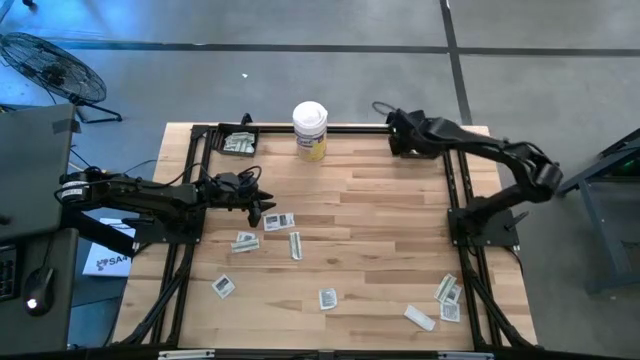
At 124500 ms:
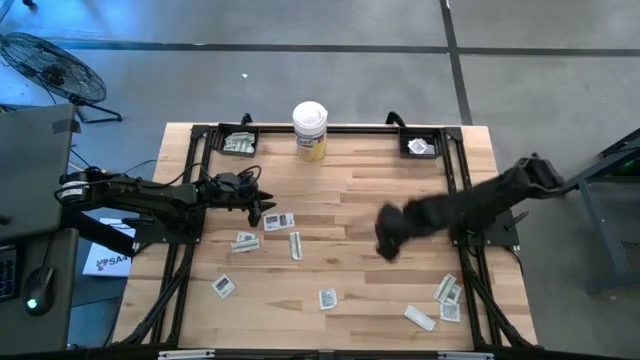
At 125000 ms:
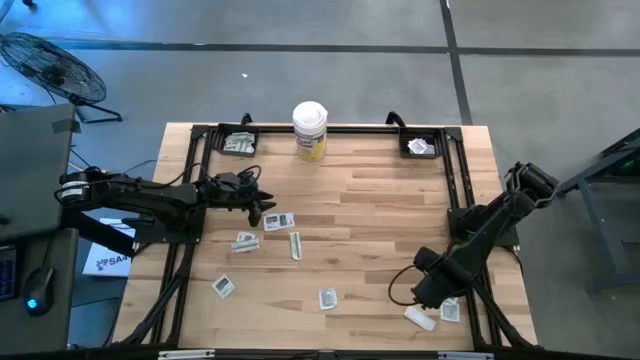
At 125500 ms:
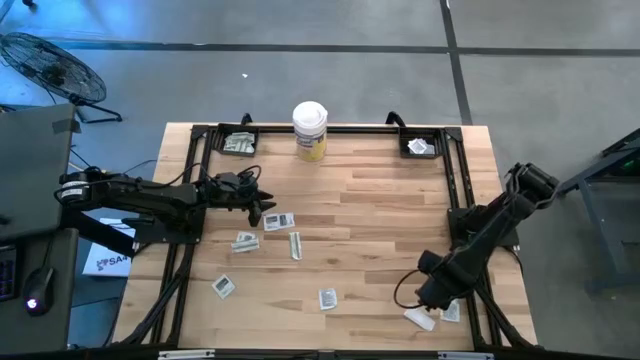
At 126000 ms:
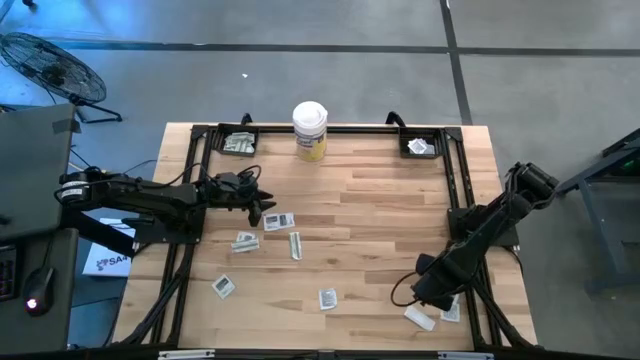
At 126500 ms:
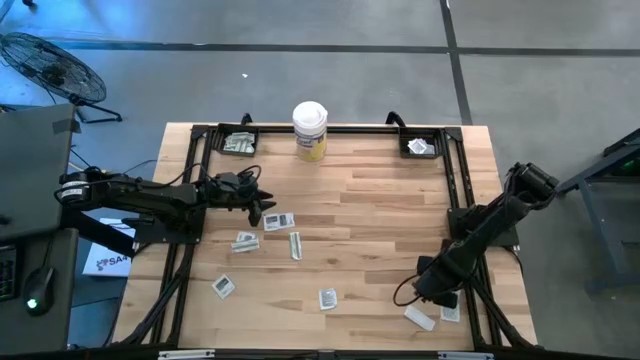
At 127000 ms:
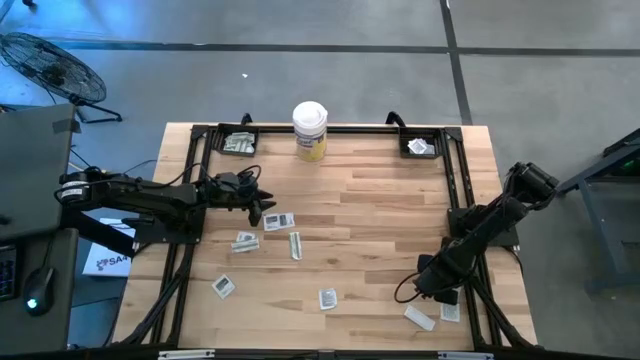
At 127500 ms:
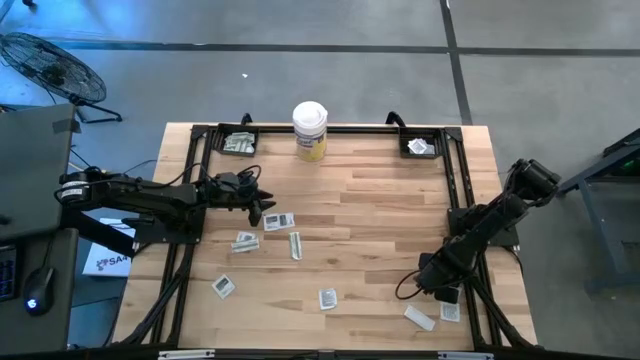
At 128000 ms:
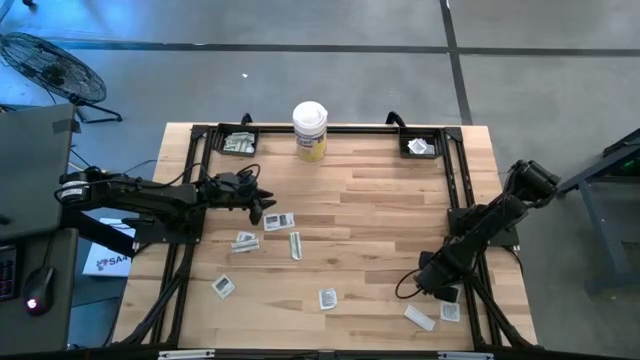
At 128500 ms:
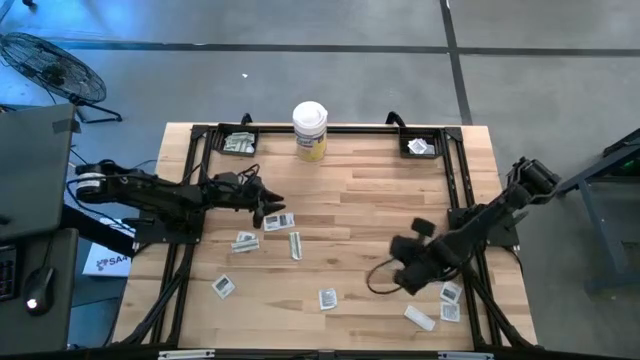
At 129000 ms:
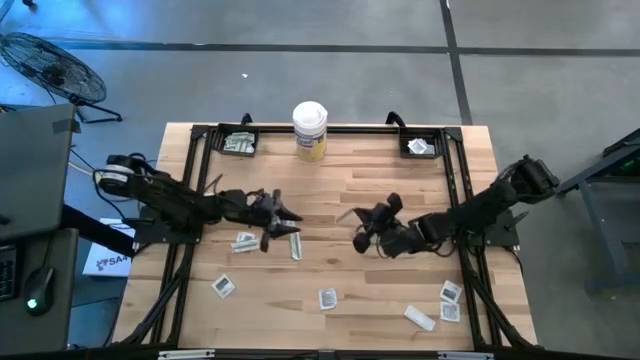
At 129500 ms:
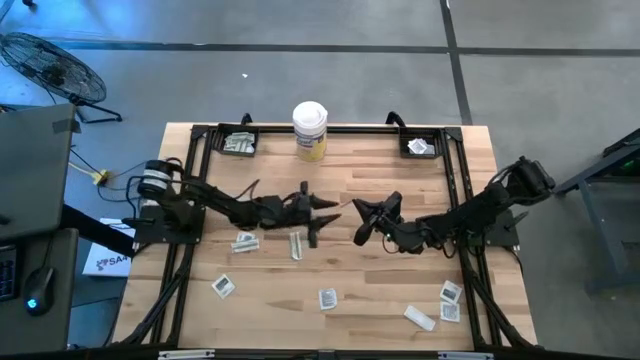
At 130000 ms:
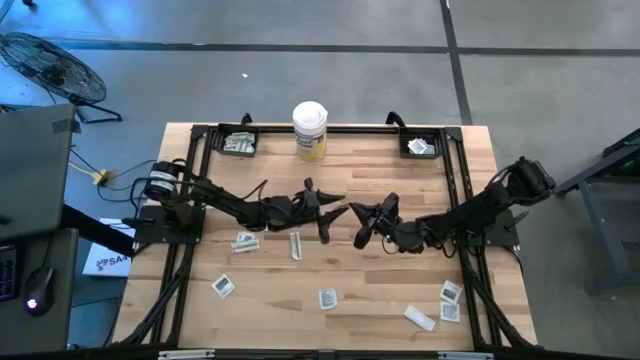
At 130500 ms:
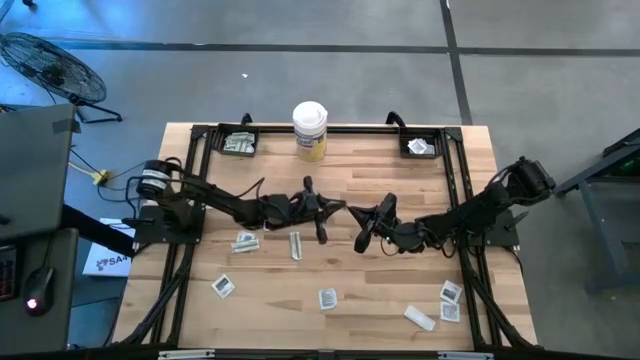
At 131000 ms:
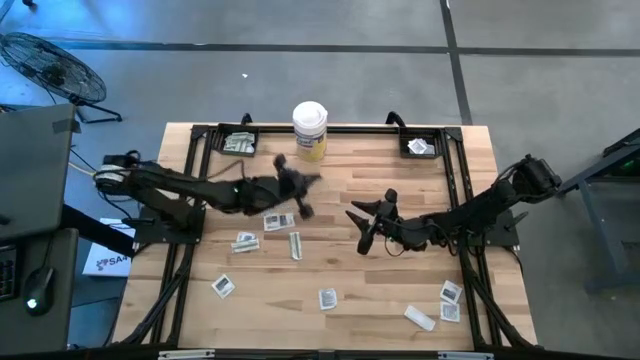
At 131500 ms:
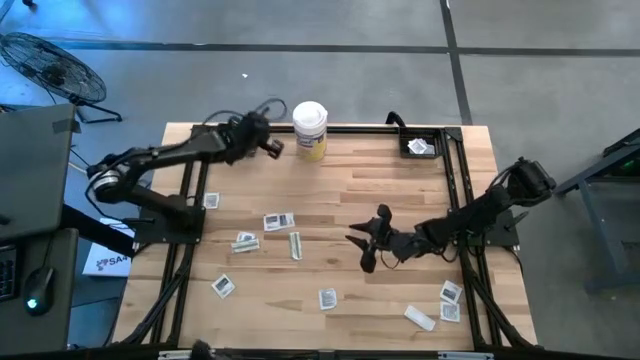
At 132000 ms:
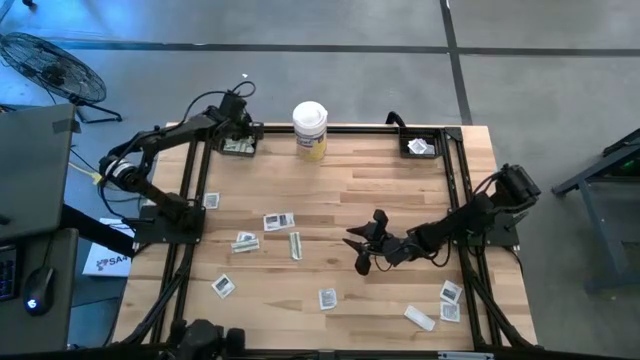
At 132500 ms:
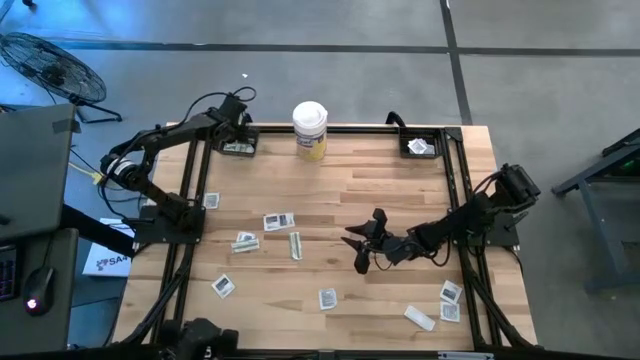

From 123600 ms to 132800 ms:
Task: Pick & Place First Aid Supplies
Put the green bandage pack into the left black basket

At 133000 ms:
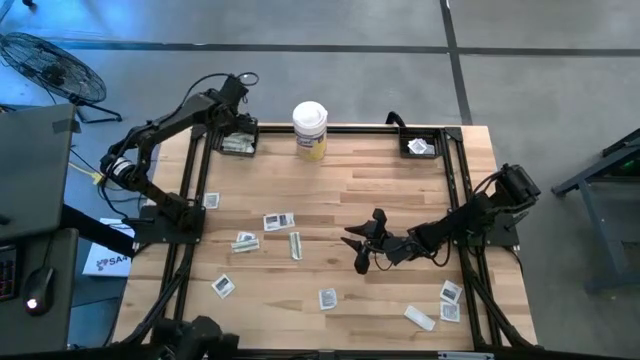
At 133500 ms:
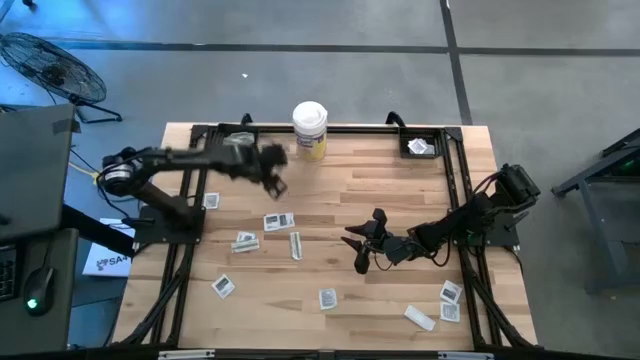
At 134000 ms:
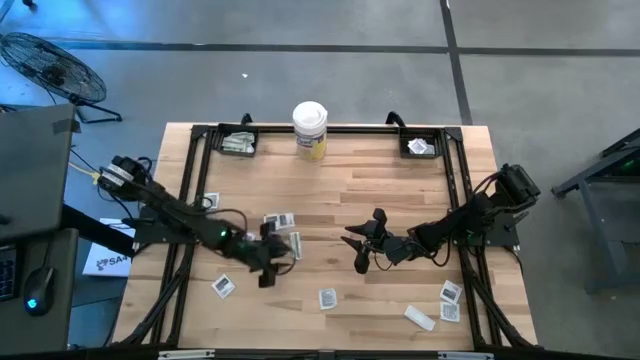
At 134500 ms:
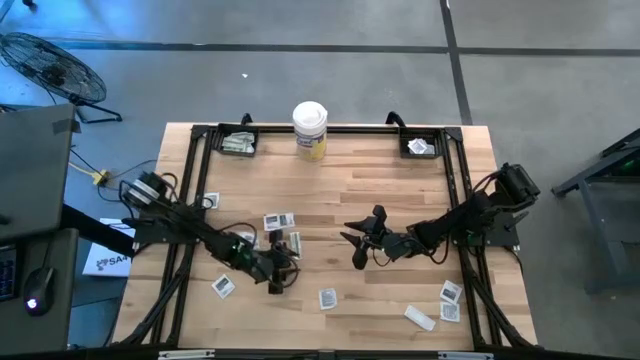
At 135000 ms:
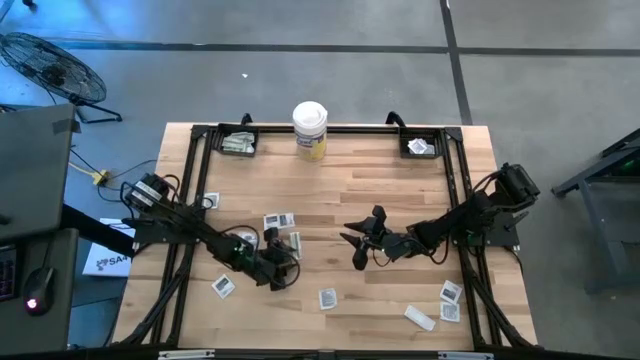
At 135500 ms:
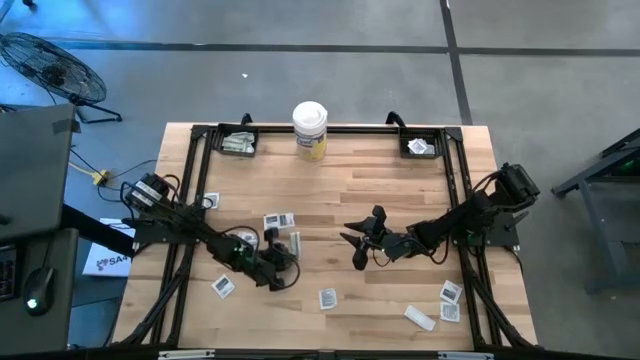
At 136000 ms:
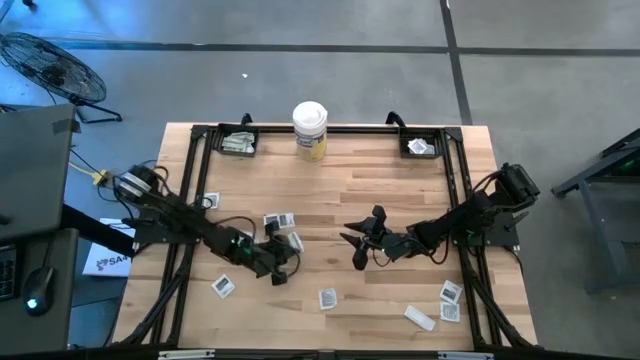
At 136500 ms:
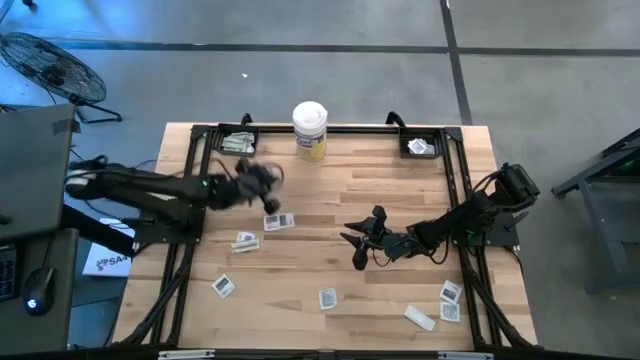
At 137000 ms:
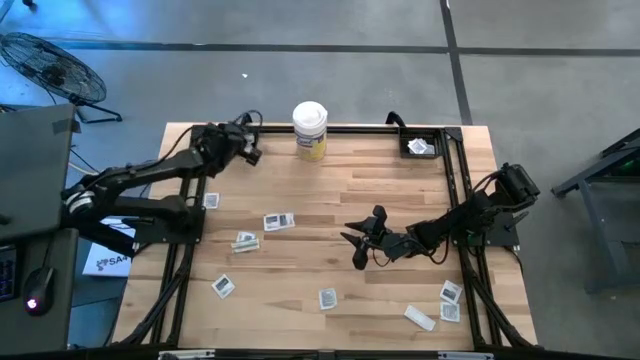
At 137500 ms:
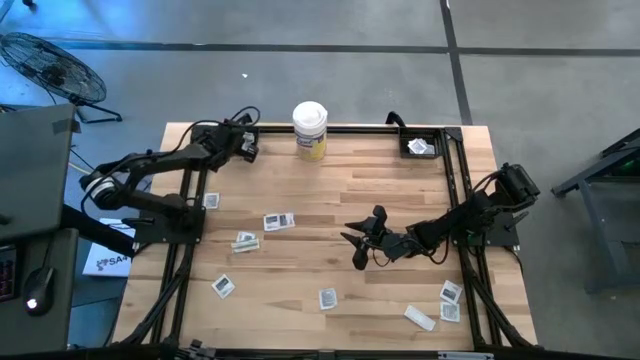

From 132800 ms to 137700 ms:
Put the green bandage pack into the left black basket

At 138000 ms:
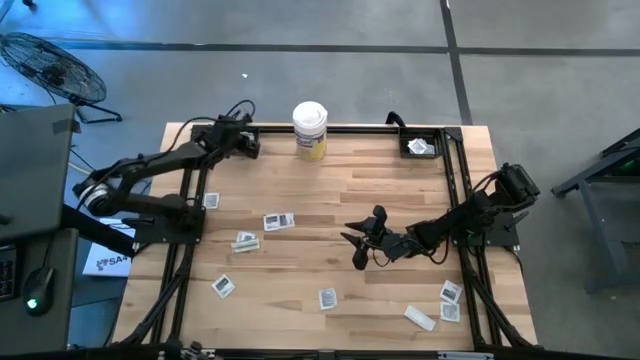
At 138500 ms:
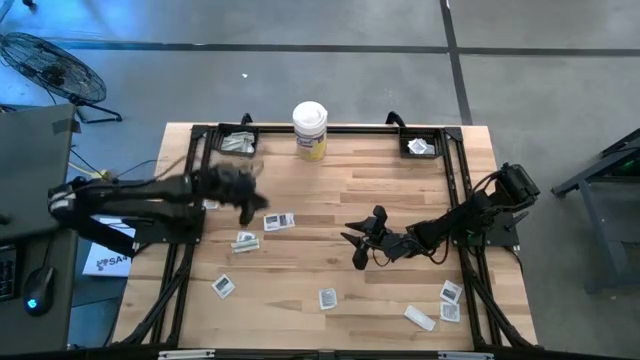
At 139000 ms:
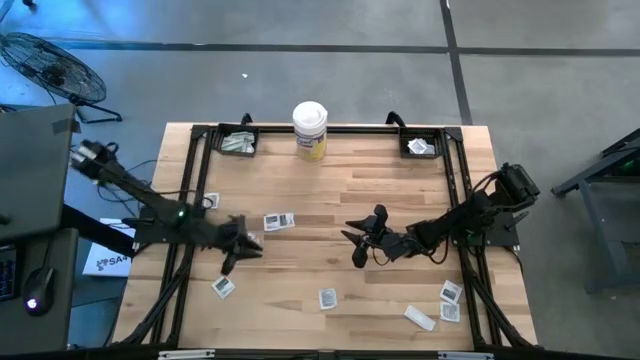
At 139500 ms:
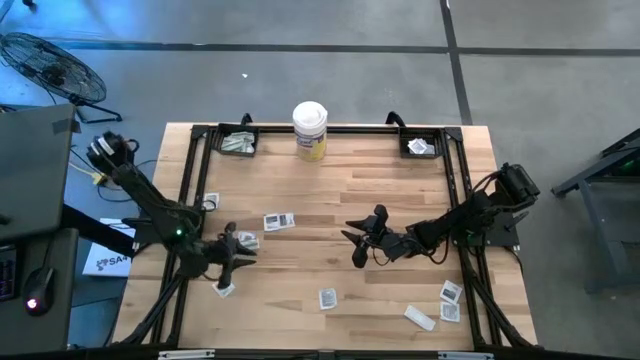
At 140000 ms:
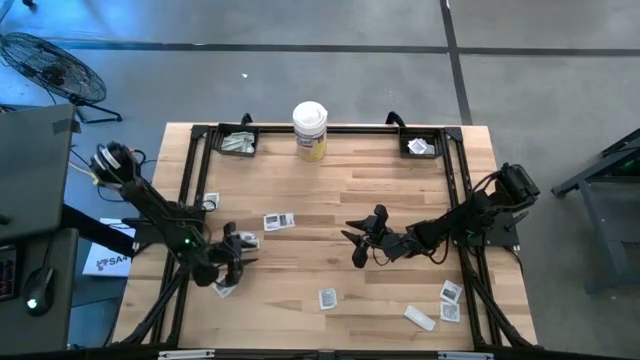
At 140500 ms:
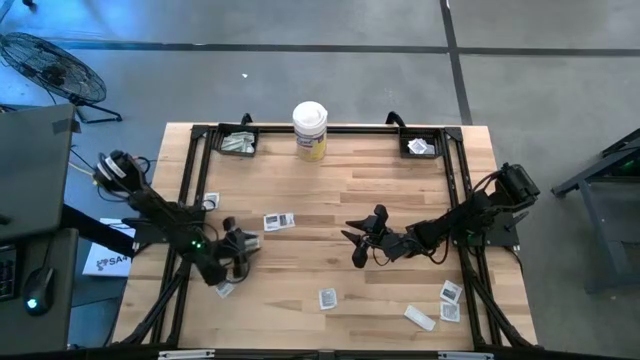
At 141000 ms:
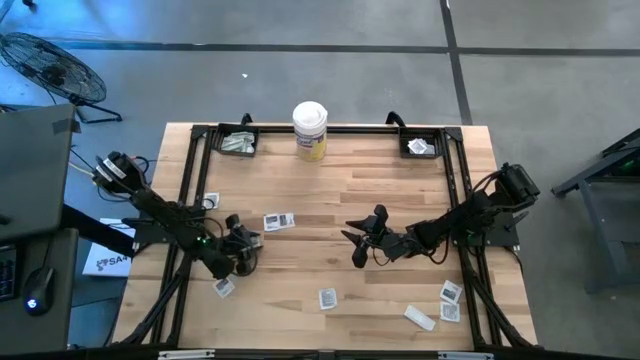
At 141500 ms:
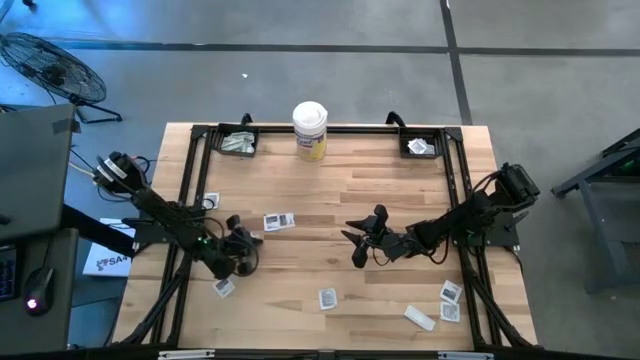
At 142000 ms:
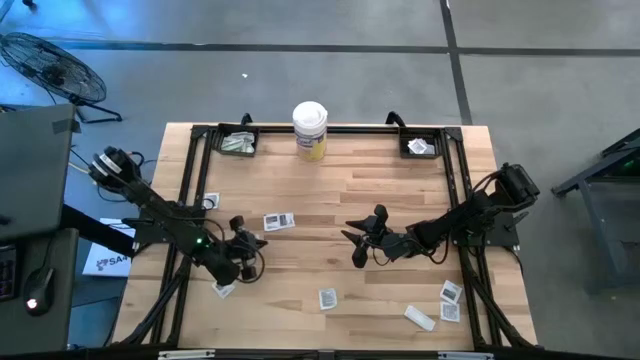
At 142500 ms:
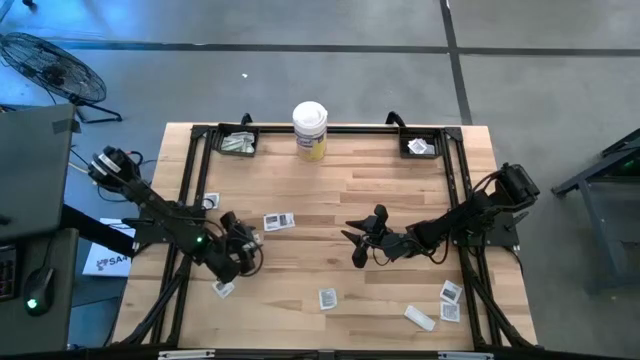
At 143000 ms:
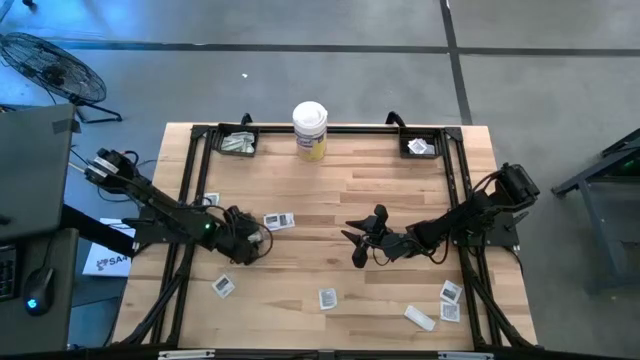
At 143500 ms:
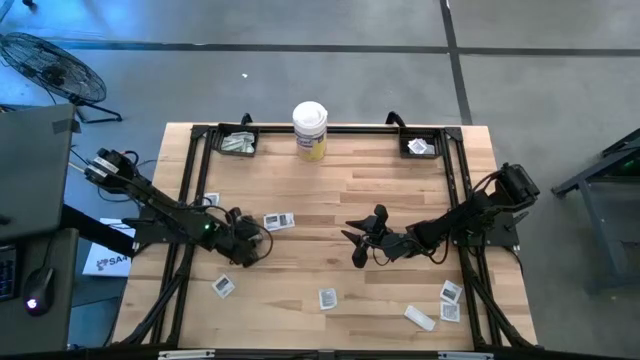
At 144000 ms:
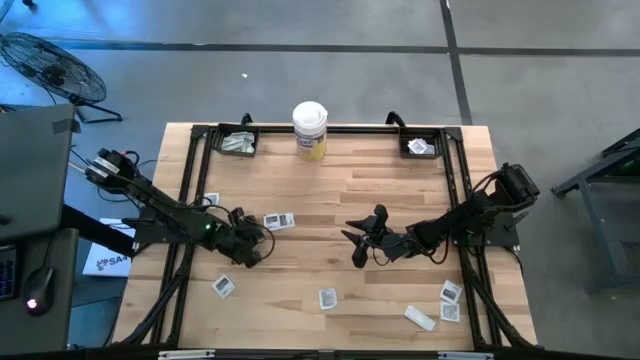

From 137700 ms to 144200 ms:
Put the green bandage pack into the left black basket
